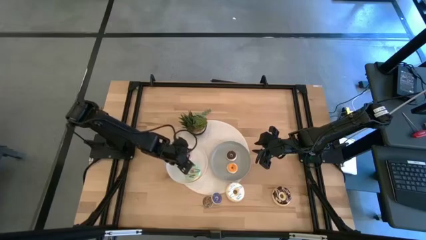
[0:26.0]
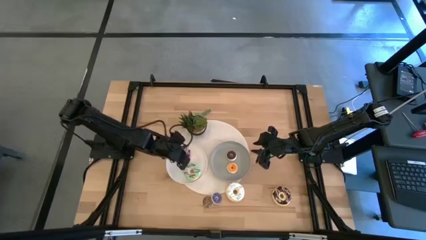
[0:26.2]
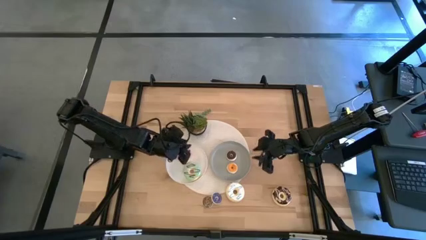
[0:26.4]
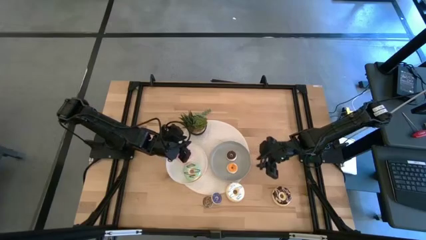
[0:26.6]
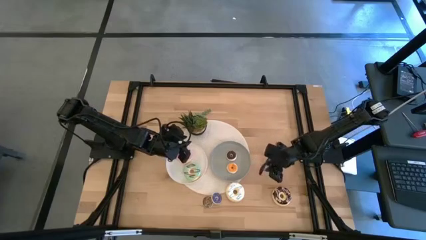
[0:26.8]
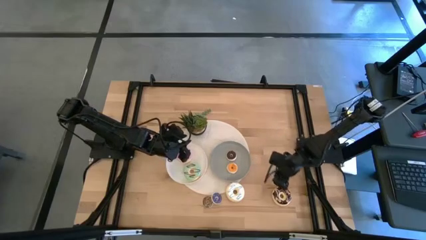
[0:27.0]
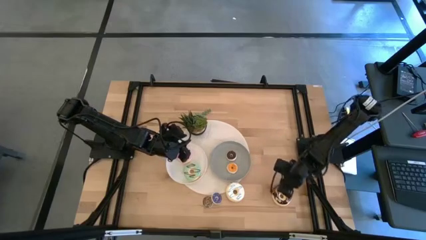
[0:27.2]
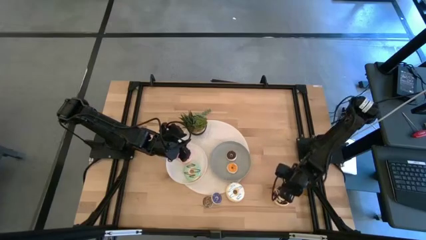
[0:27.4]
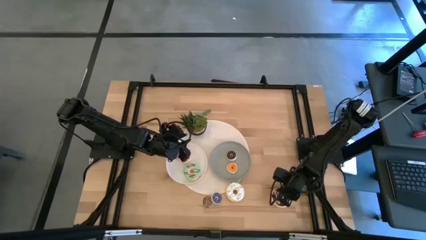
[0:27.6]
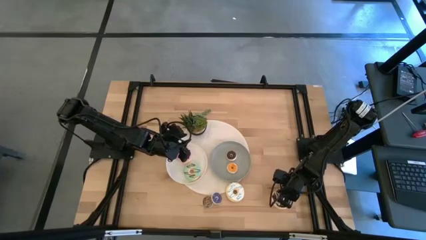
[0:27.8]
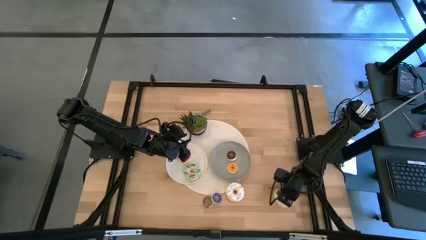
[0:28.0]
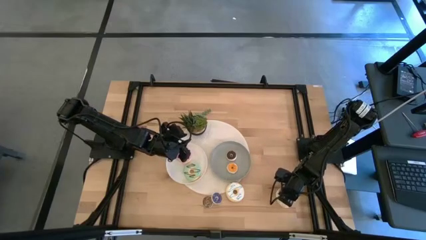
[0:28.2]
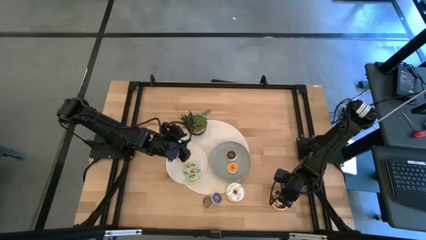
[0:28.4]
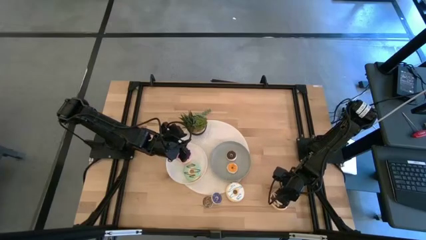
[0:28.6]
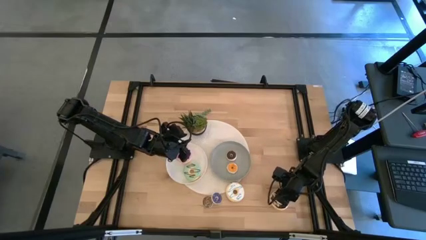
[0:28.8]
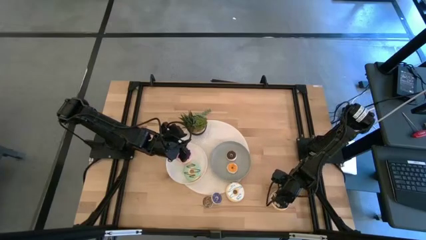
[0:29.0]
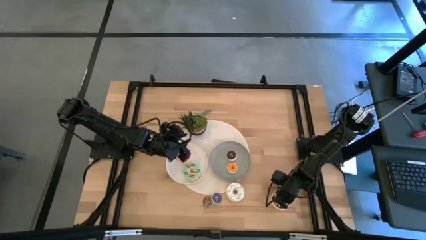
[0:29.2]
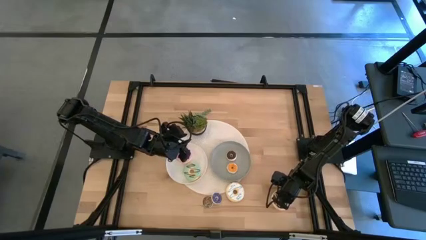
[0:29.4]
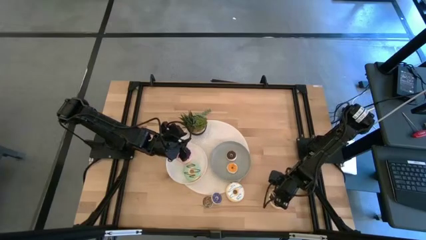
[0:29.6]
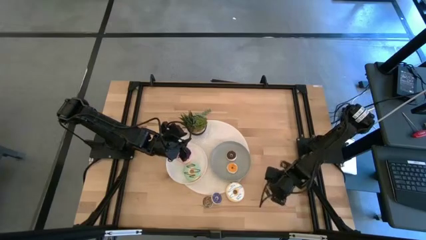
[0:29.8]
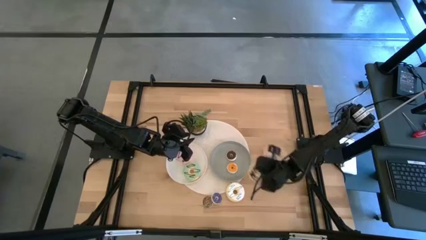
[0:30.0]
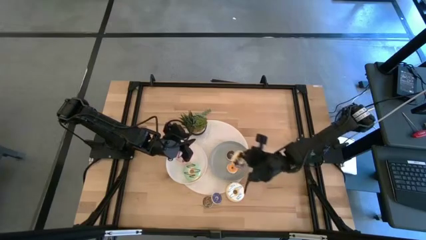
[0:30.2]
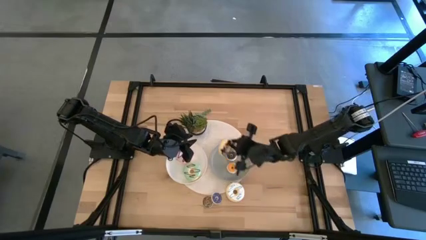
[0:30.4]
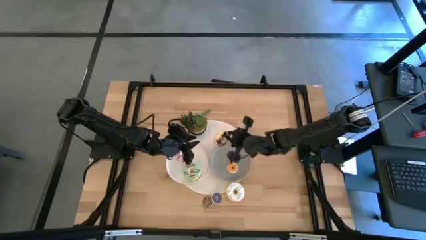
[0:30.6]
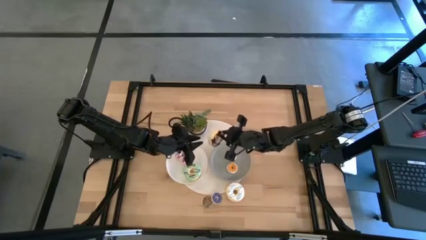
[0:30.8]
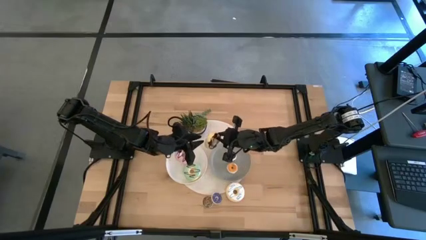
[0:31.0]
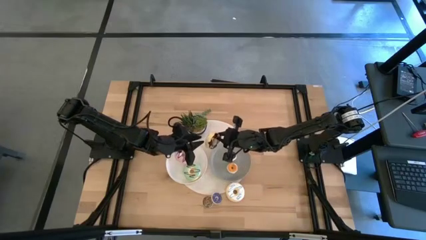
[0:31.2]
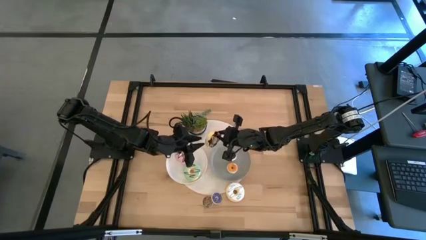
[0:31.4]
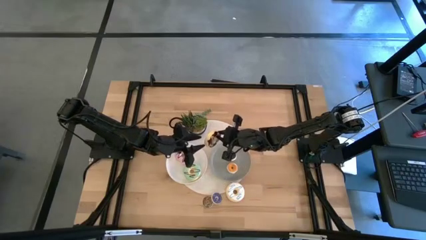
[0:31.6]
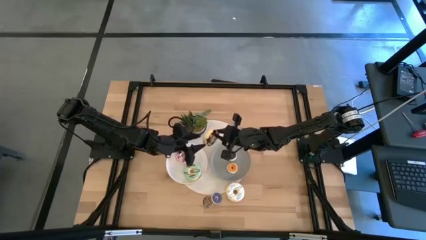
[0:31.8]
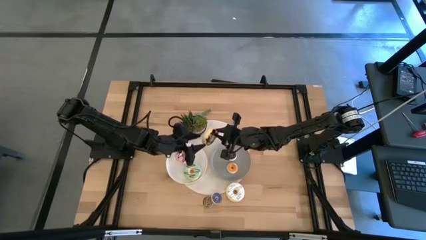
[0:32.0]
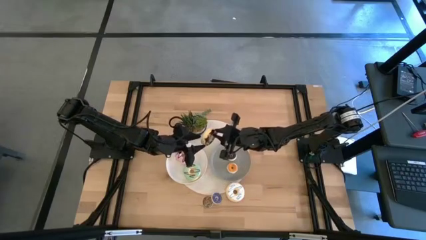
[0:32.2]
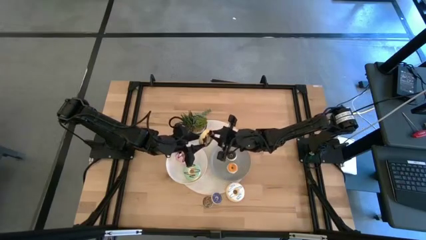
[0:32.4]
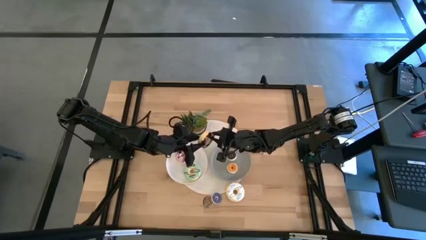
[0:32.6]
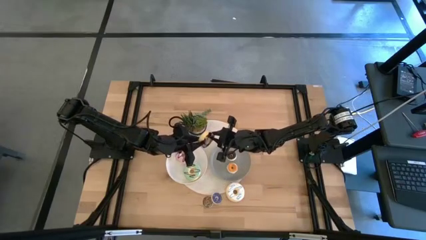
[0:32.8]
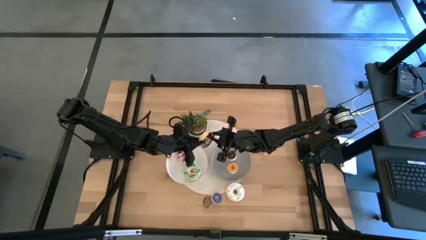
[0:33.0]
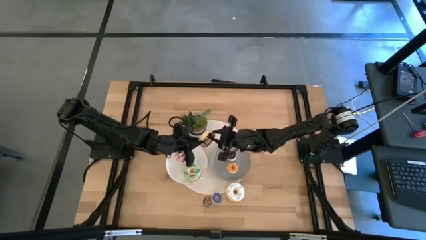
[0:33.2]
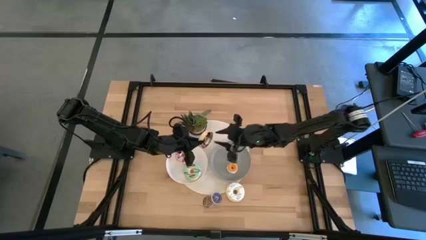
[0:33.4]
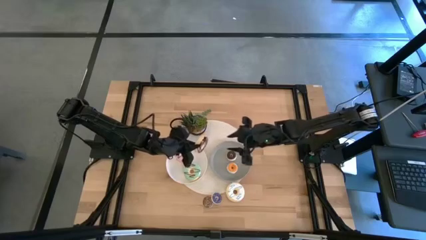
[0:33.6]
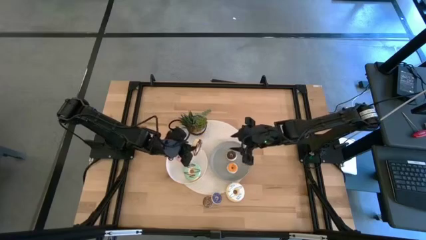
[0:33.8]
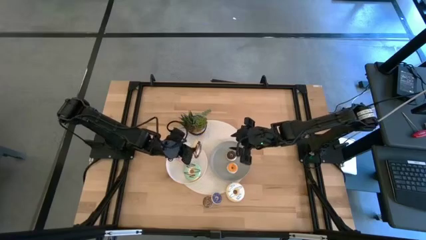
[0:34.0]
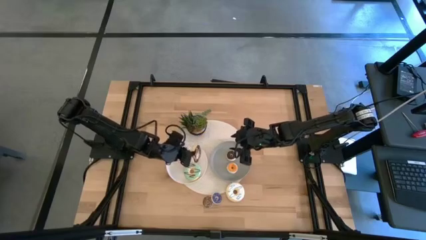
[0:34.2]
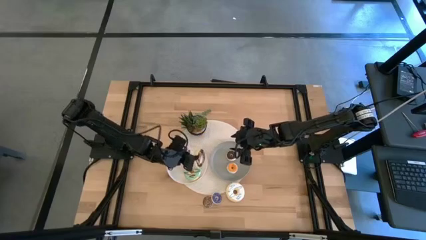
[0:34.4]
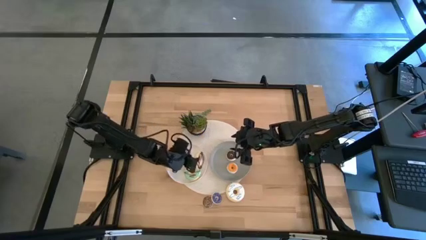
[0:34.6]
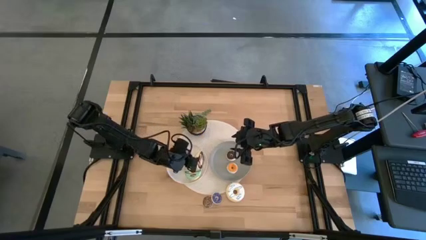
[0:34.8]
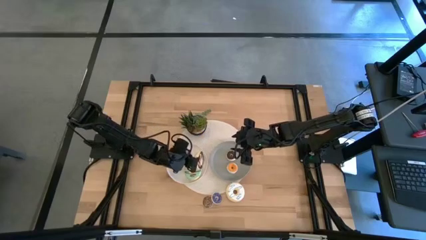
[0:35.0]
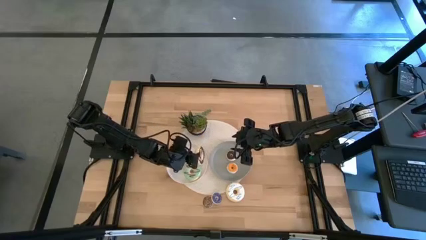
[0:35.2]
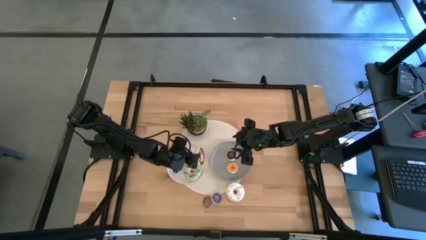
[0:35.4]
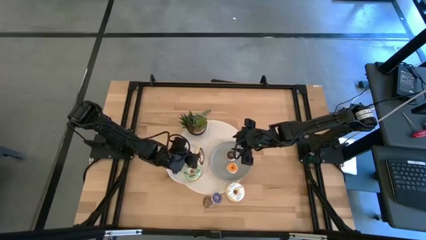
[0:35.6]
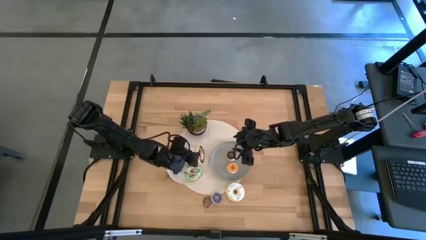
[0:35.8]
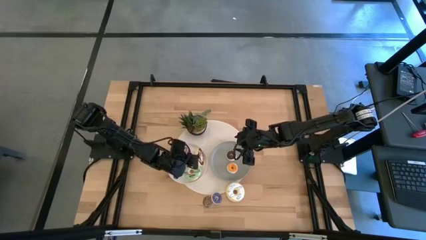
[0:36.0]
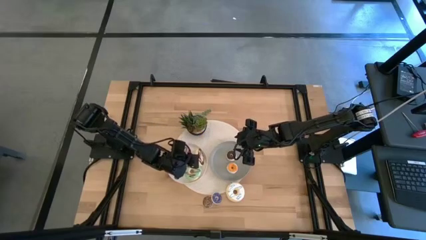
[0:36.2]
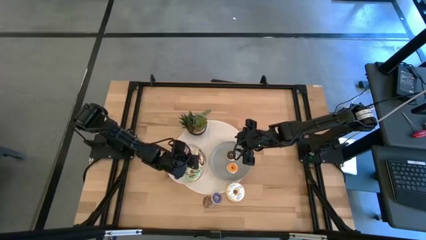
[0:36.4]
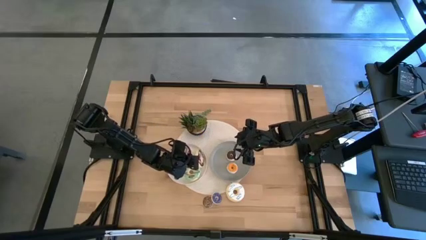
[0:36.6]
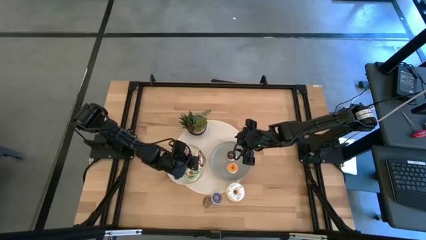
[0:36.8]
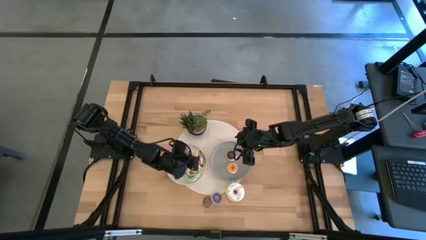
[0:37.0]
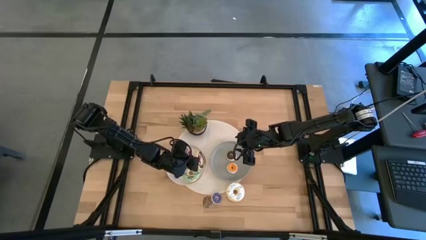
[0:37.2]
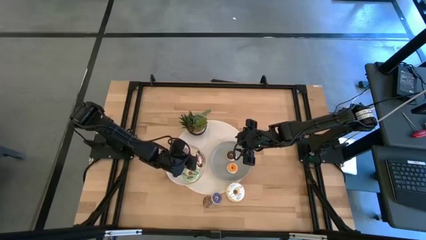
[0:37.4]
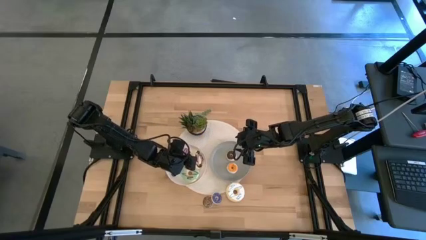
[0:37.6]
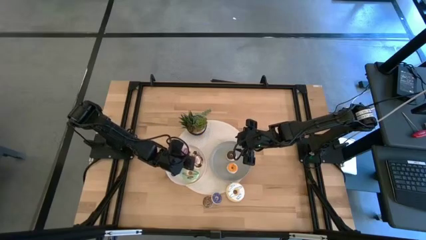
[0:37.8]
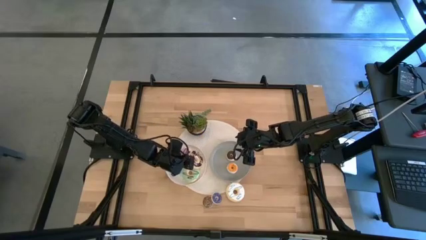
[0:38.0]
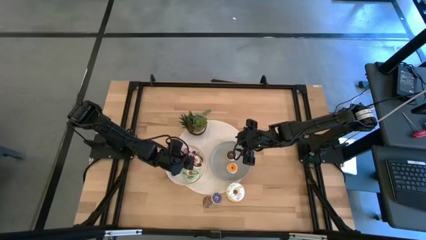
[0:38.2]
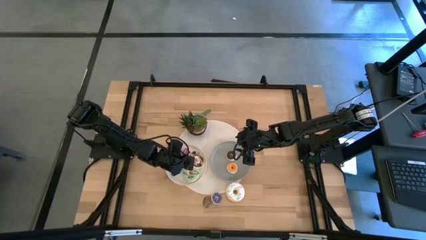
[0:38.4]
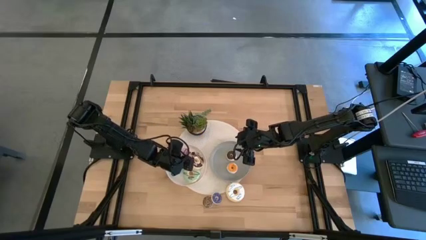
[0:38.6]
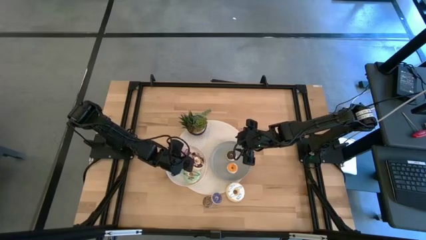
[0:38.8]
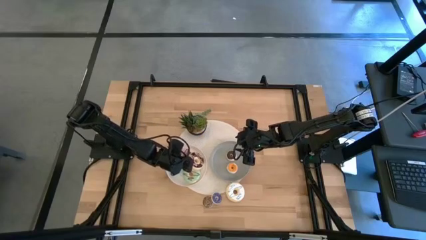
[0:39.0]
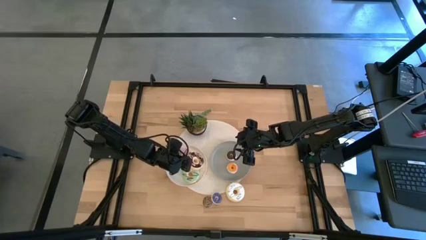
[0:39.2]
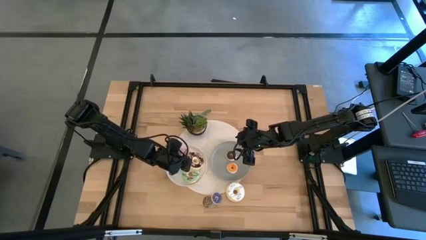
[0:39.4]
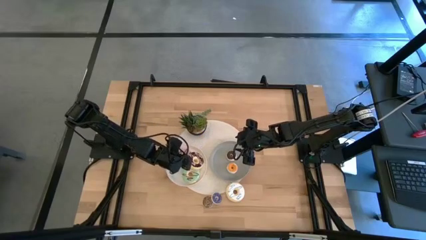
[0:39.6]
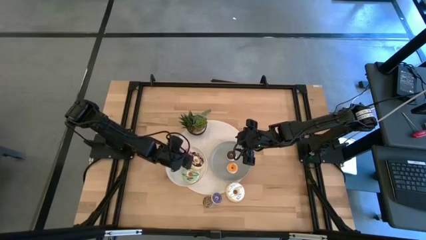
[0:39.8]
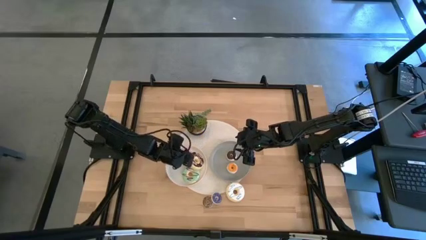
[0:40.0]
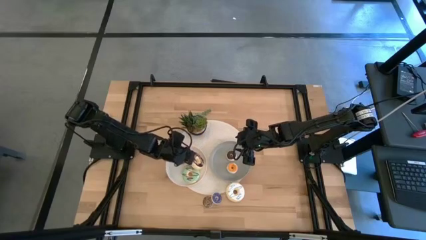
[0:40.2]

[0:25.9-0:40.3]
Task: Pick & Place donuts
Put the big black donut onto the white plate

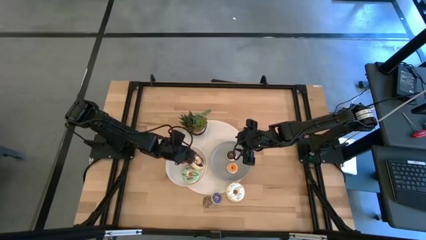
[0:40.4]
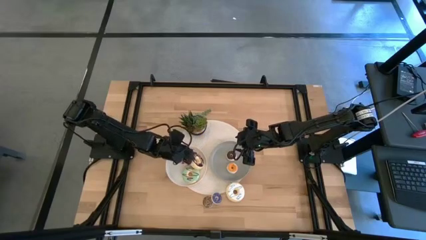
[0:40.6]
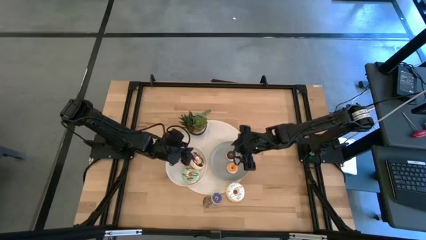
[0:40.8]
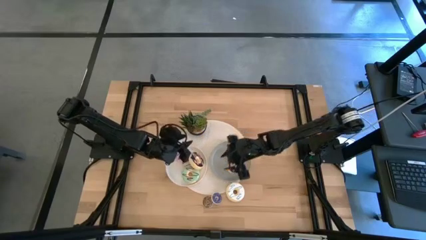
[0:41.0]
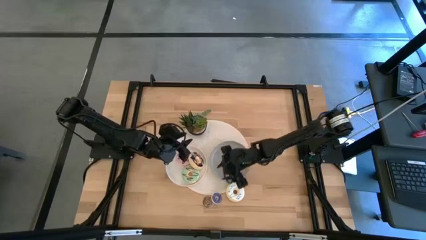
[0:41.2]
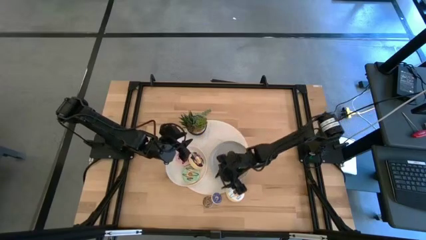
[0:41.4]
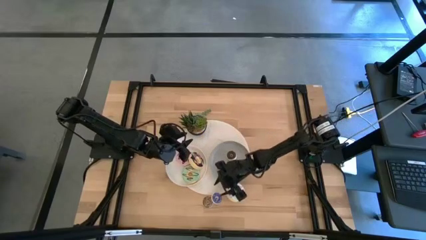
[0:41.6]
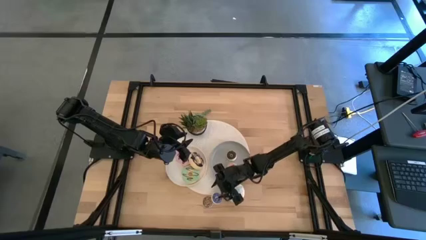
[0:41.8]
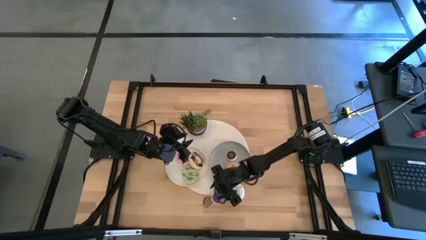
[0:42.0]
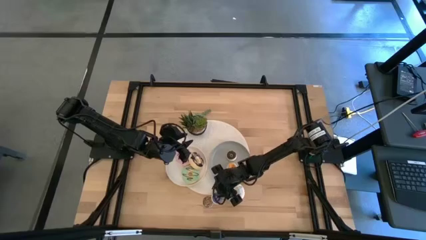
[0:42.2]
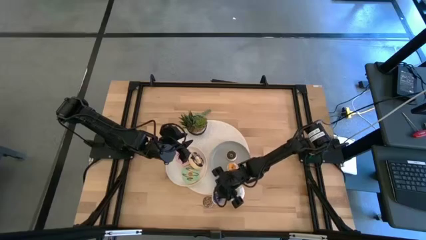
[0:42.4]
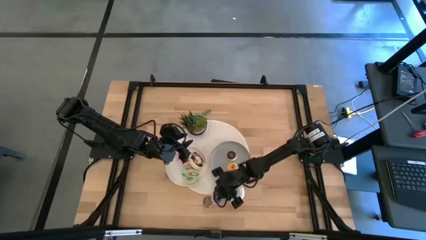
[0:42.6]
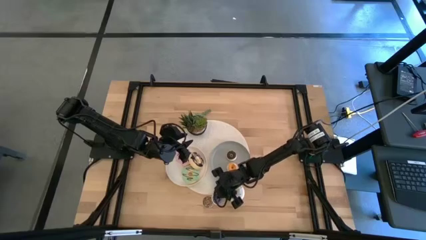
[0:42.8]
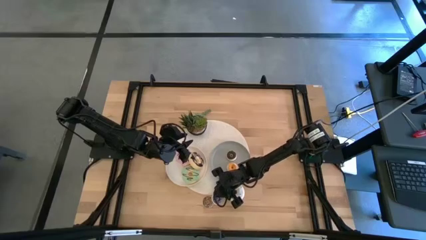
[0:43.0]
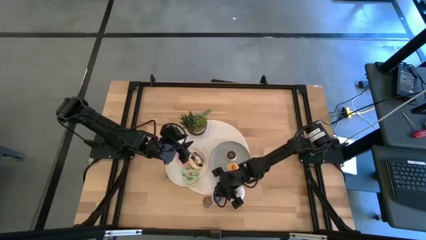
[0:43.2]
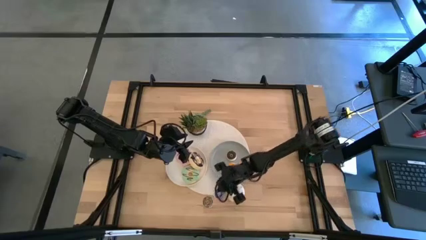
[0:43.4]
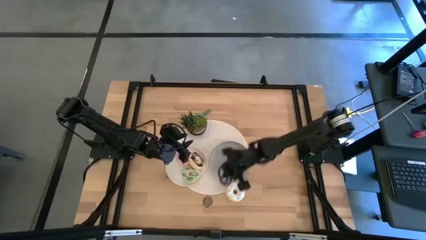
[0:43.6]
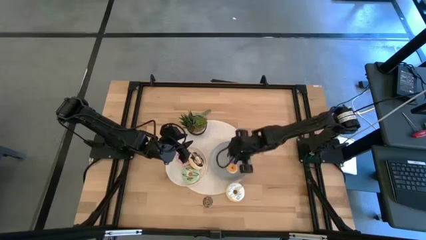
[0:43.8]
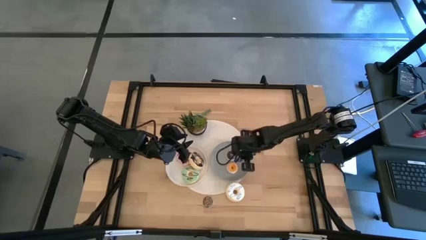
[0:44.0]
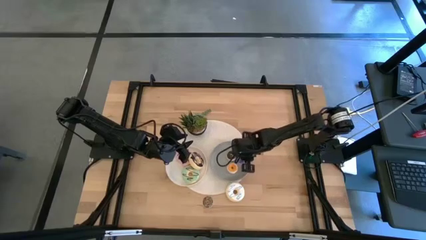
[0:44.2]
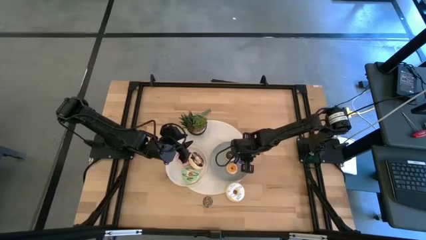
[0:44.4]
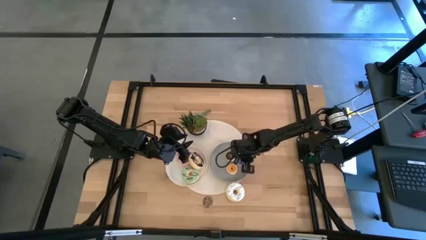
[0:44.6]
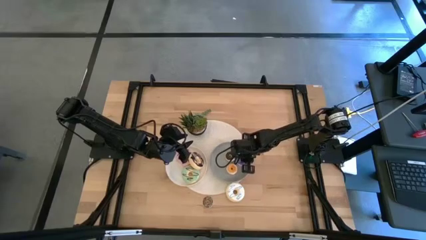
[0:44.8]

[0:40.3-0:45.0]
Put the small blue donut onto the gray plate
